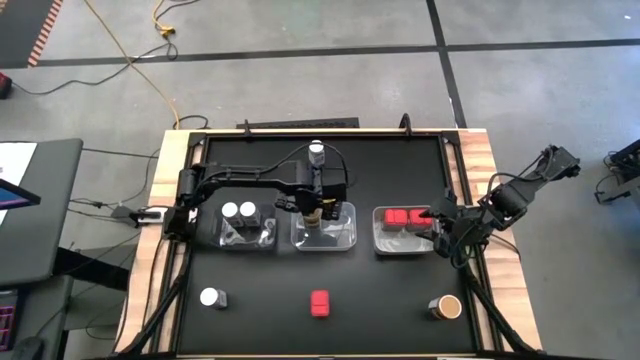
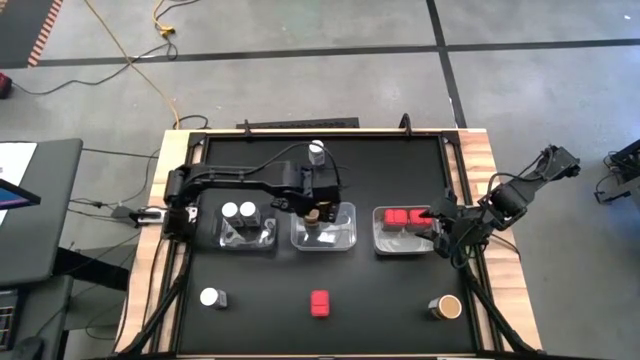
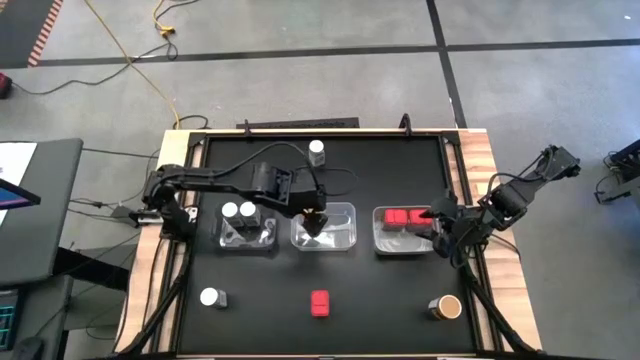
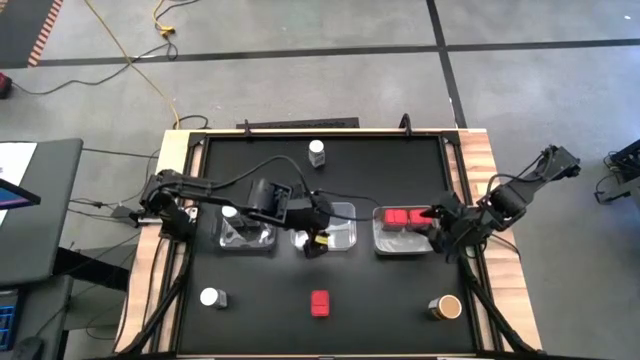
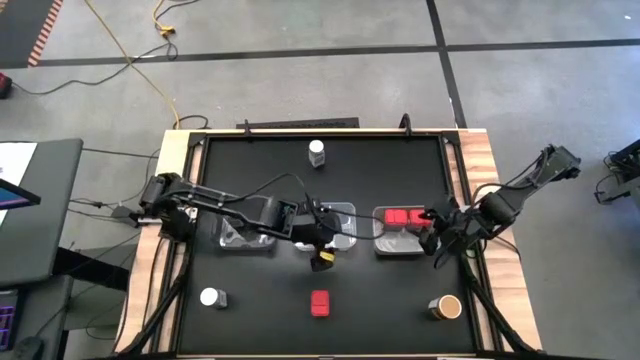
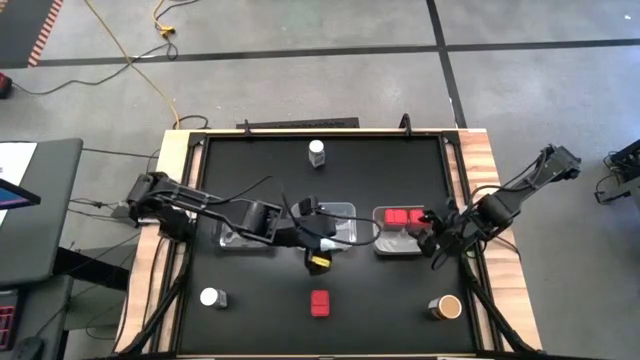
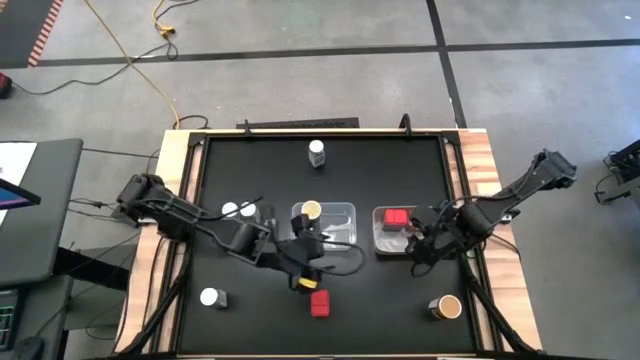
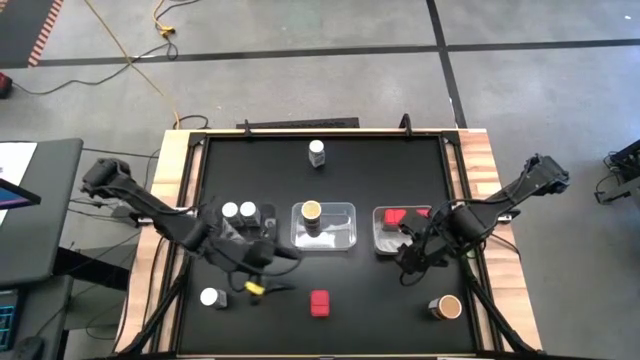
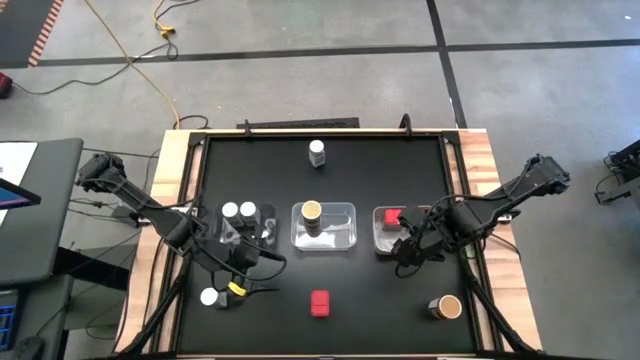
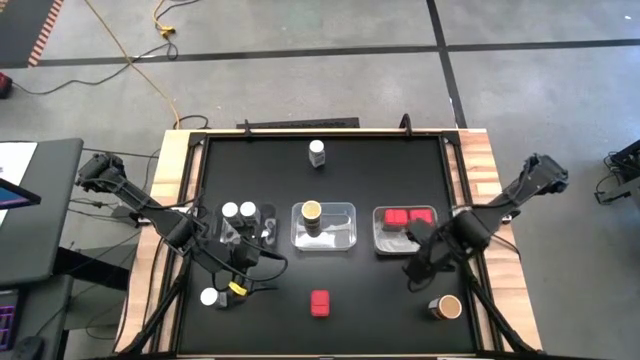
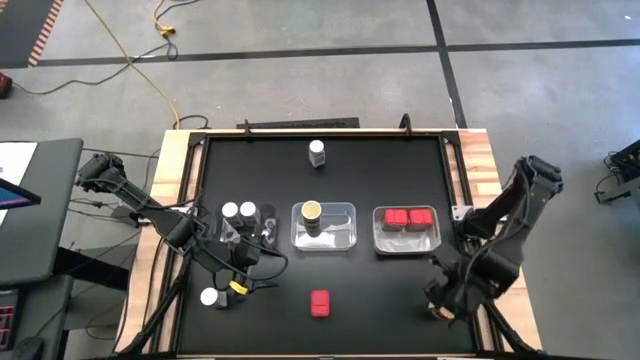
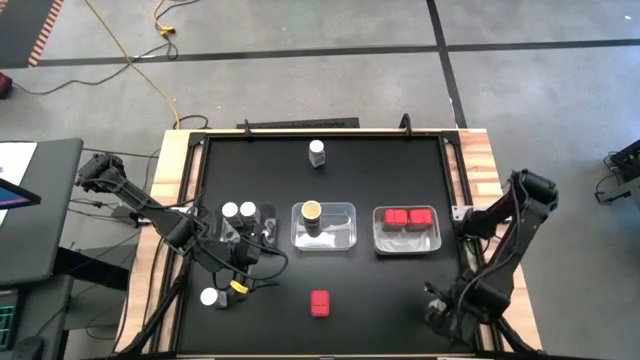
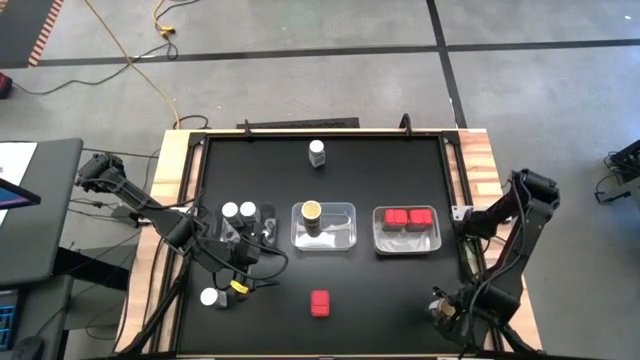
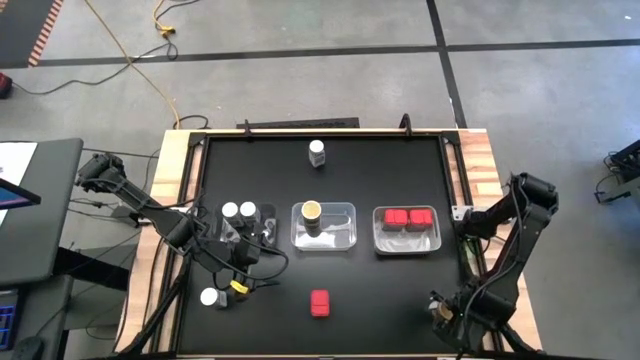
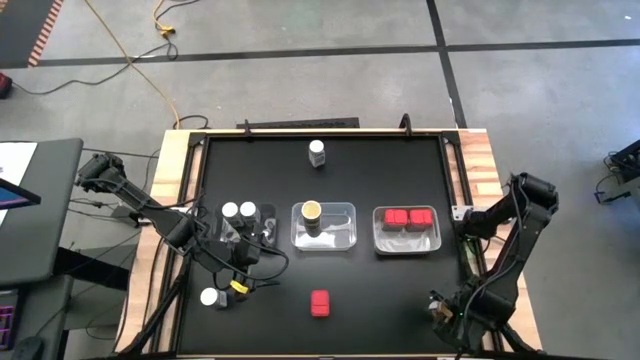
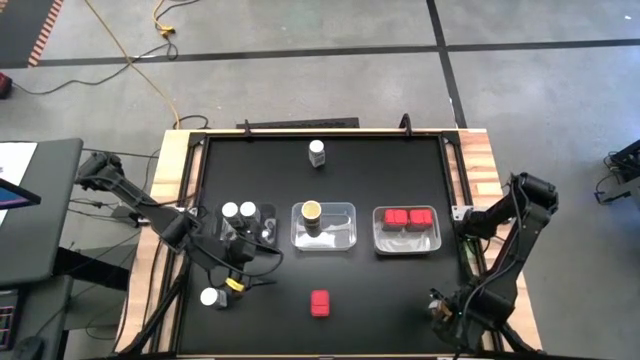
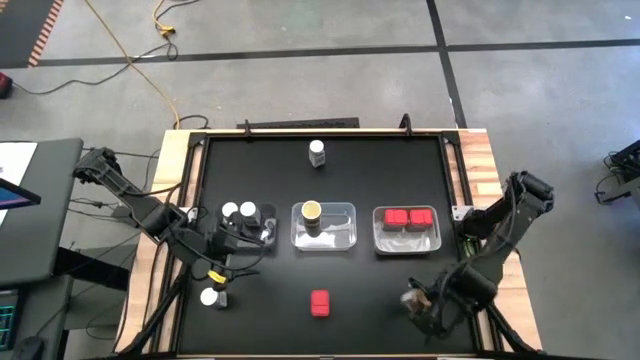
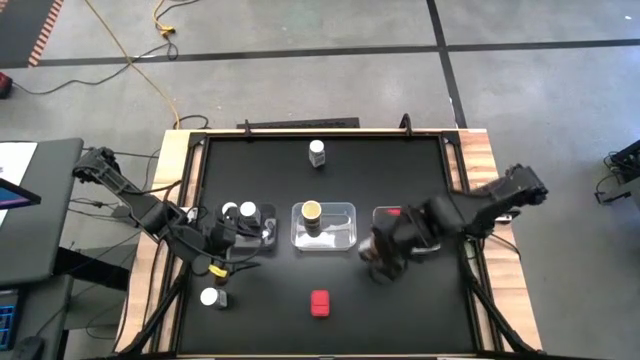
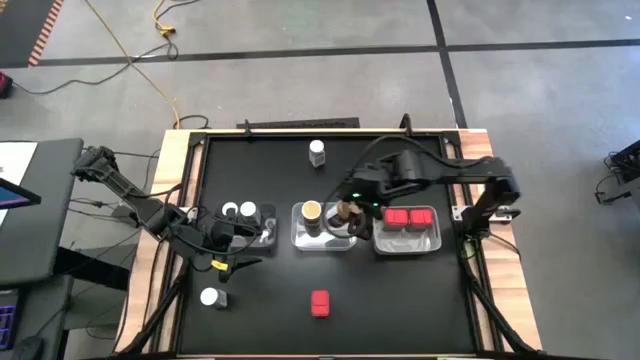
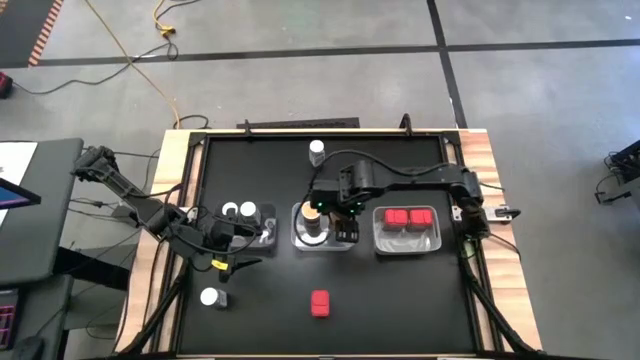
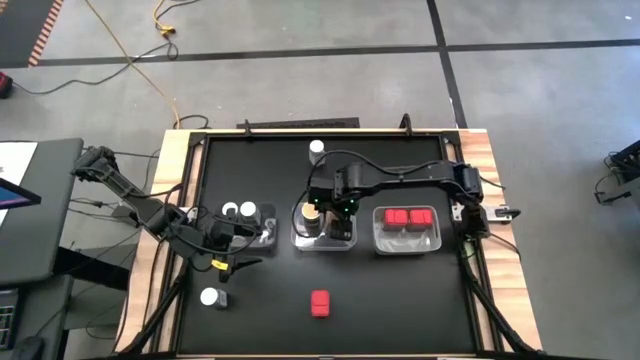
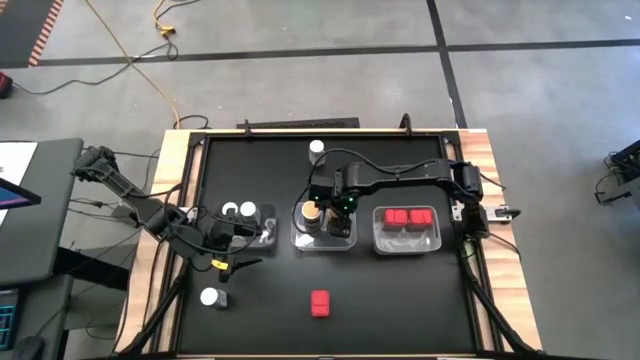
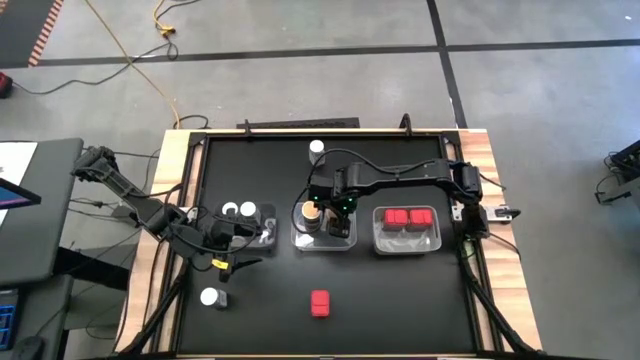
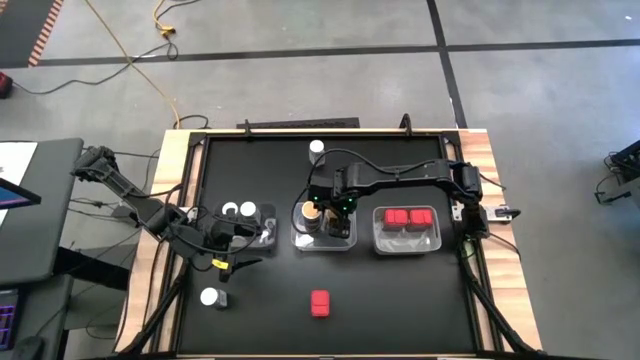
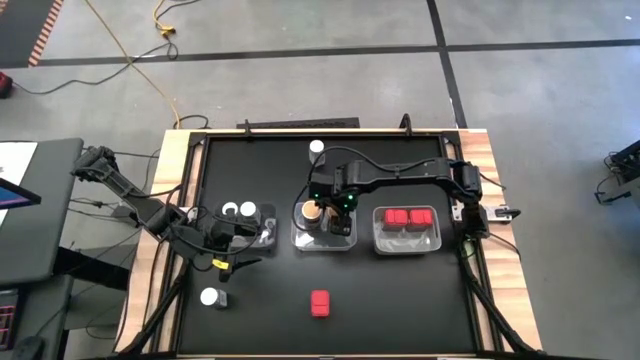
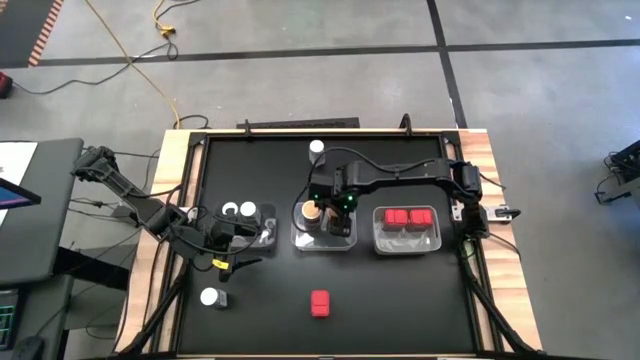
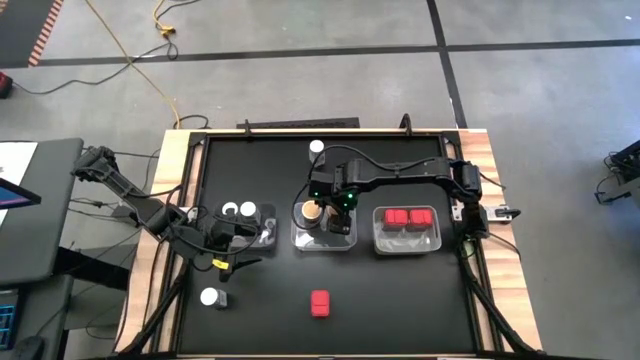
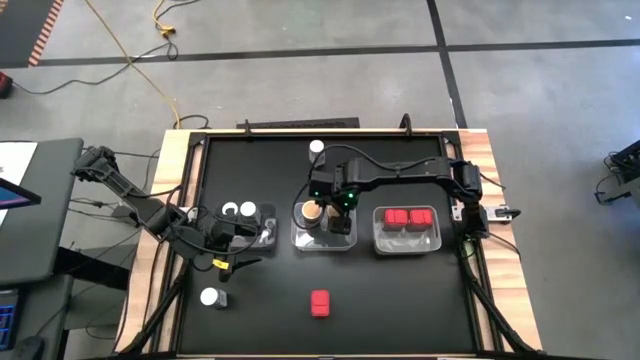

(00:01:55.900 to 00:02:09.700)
Task: Sort spices by type
Put the gold seasoning bottle into the transparent bin

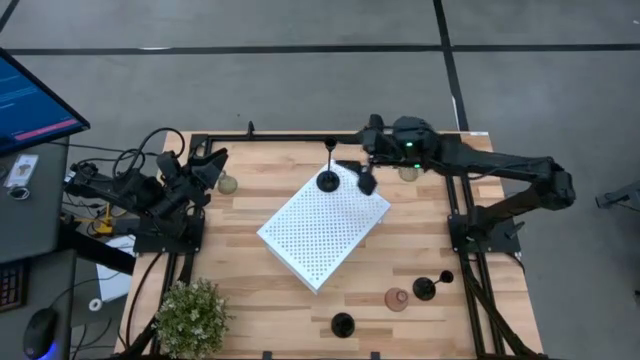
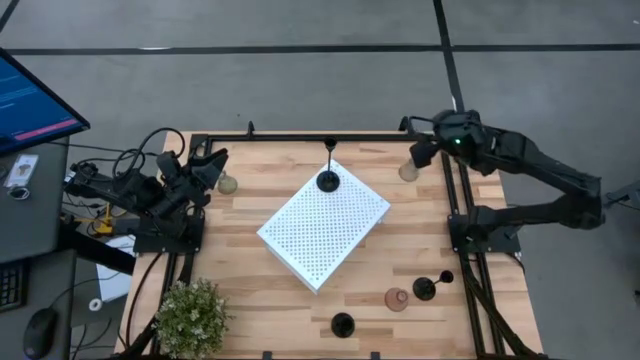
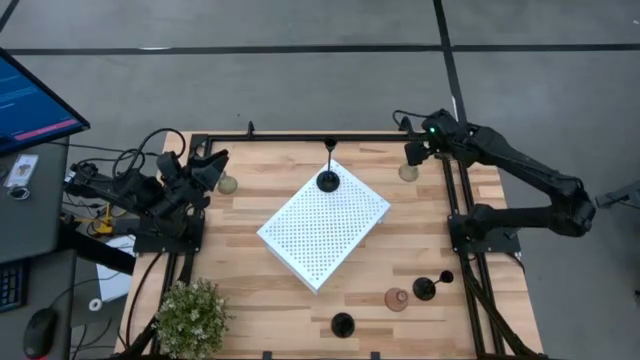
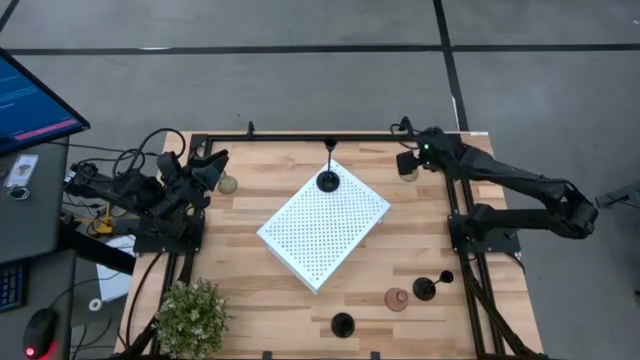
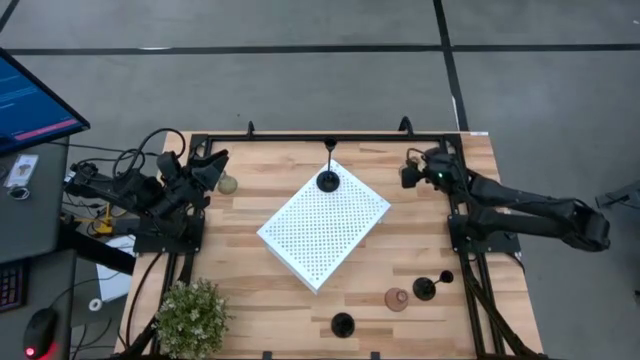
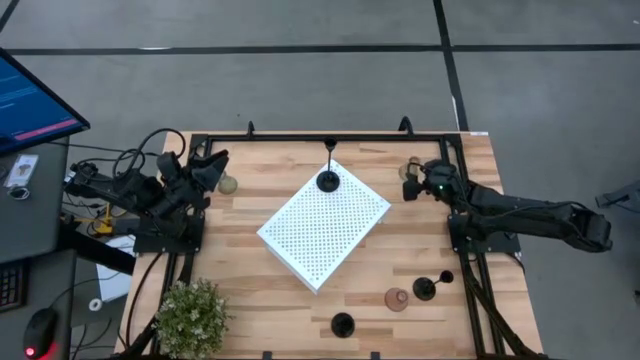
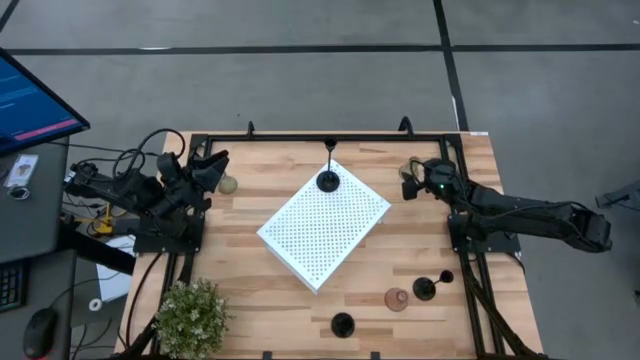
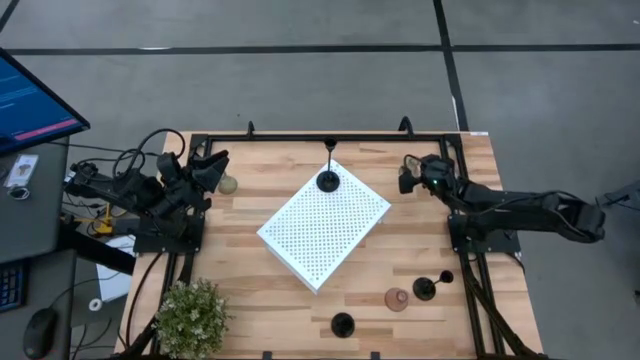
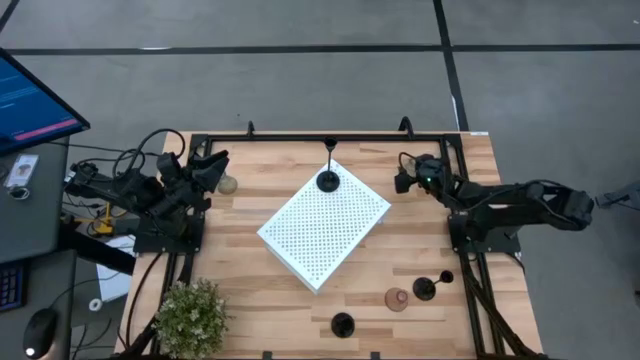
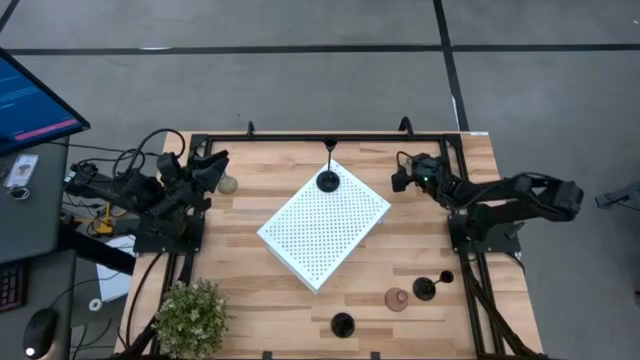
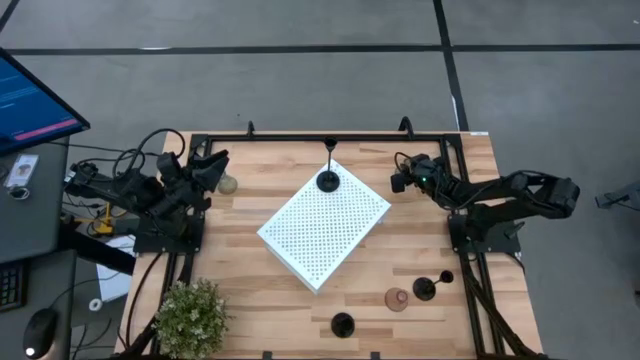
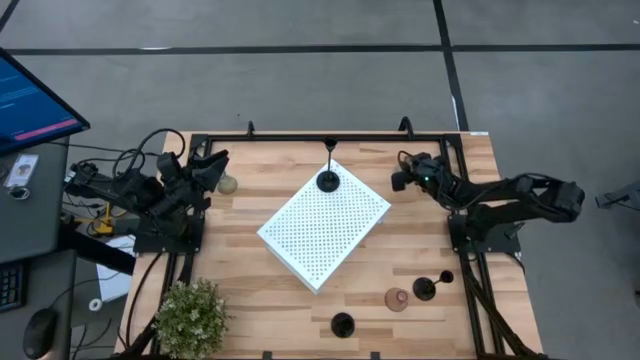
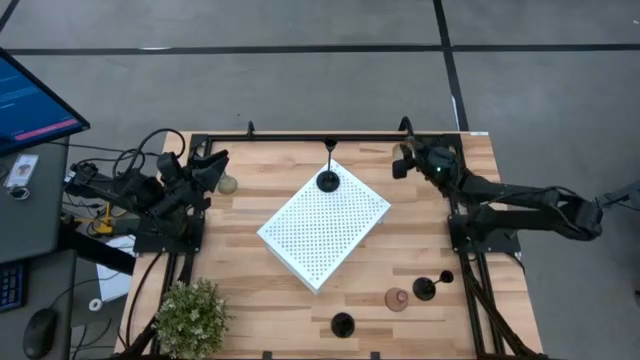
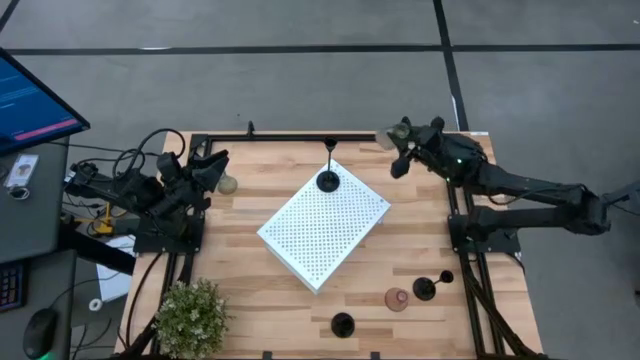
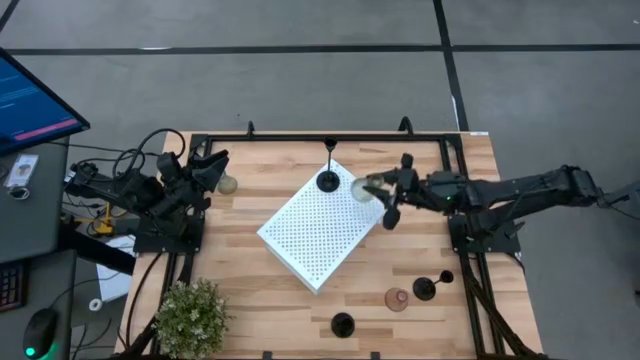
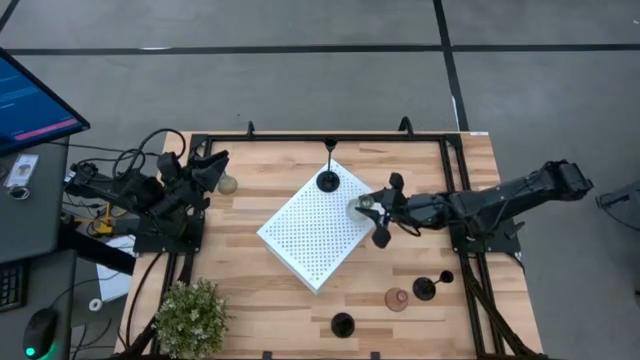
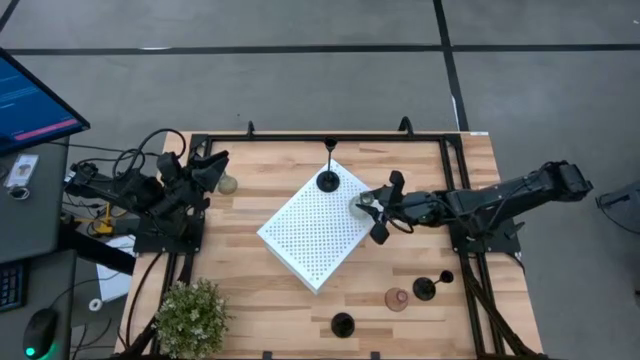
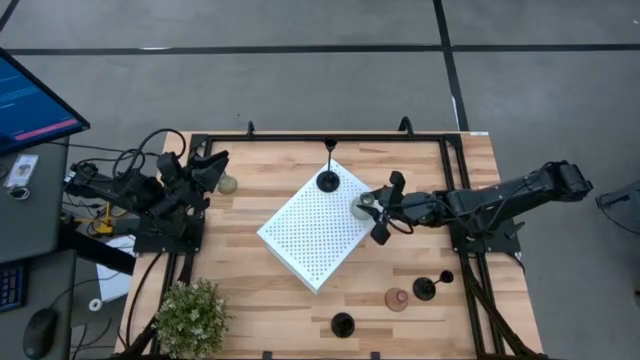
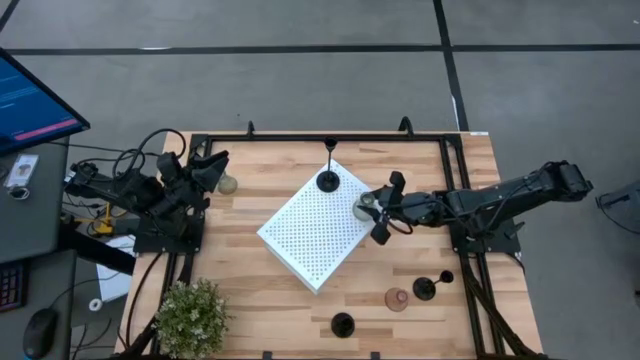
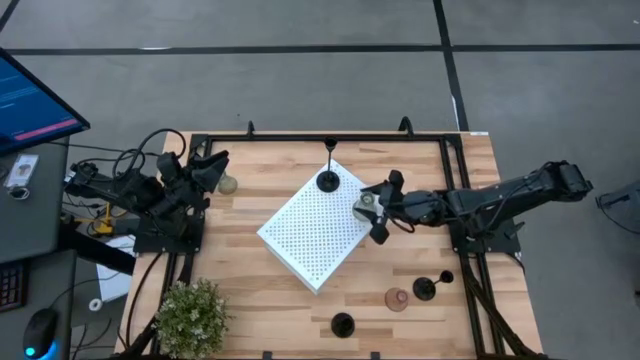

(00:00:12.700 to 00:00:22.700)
Task: Pick & Place candle stick holders
Put the right green glass candle holder on the shelf
